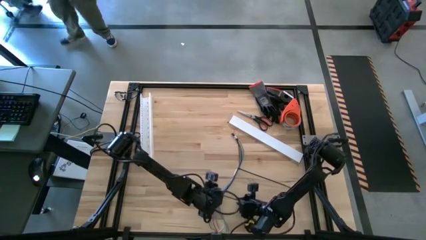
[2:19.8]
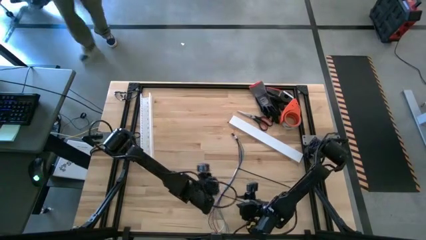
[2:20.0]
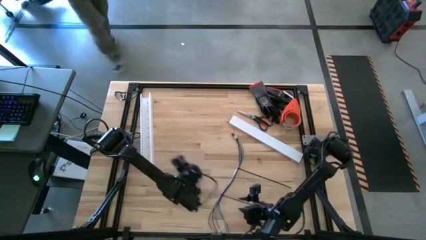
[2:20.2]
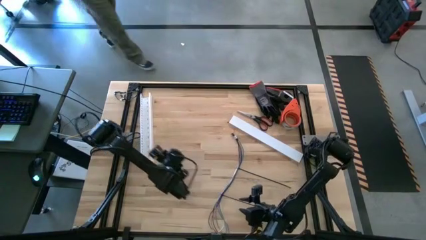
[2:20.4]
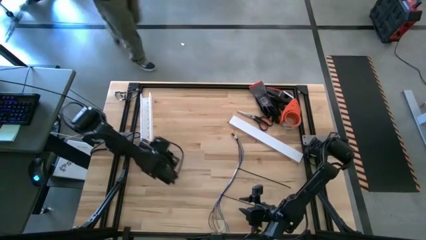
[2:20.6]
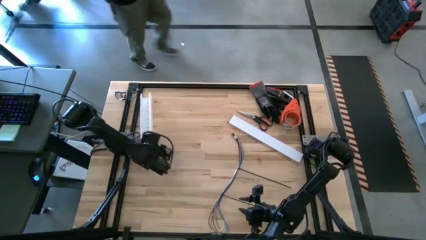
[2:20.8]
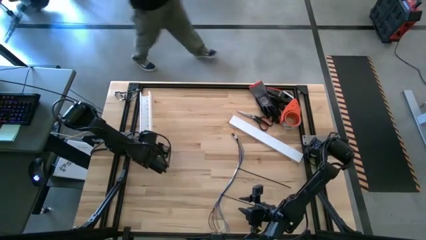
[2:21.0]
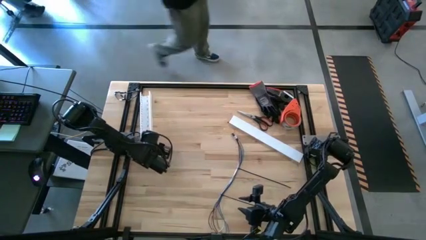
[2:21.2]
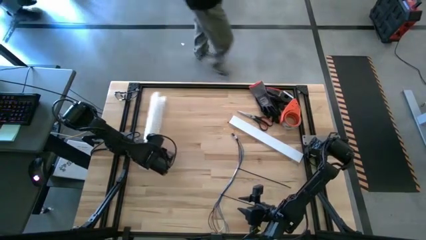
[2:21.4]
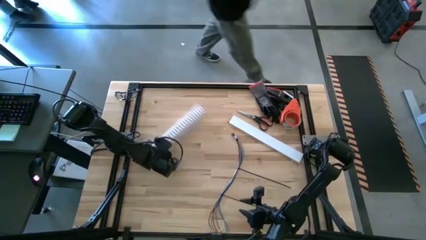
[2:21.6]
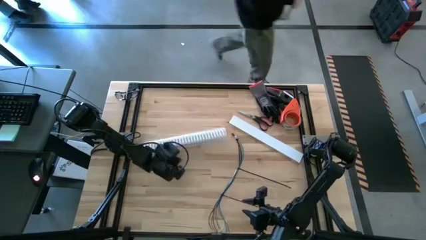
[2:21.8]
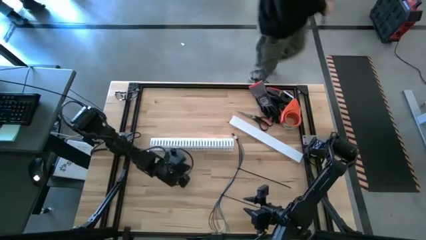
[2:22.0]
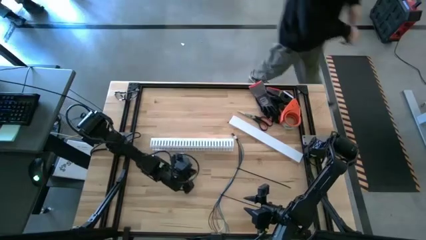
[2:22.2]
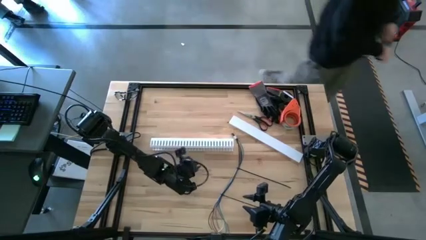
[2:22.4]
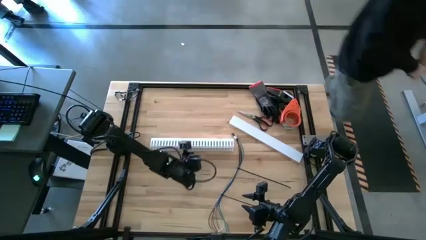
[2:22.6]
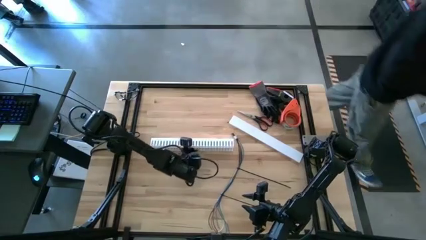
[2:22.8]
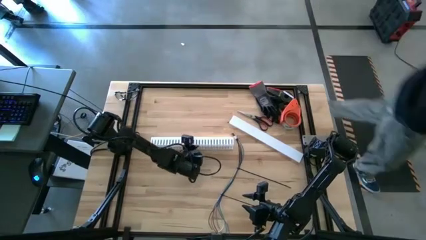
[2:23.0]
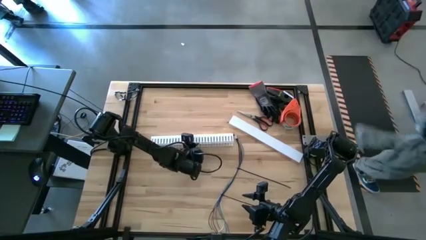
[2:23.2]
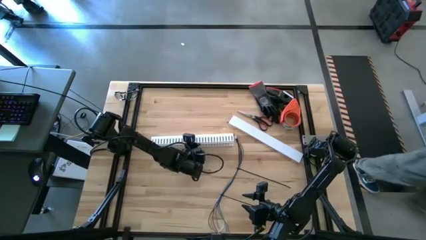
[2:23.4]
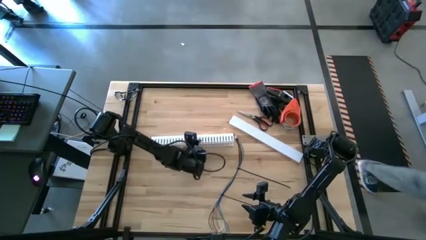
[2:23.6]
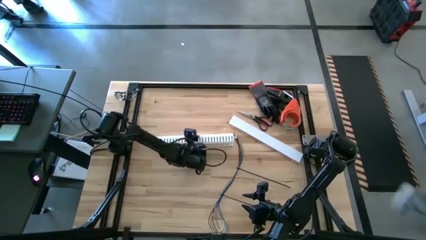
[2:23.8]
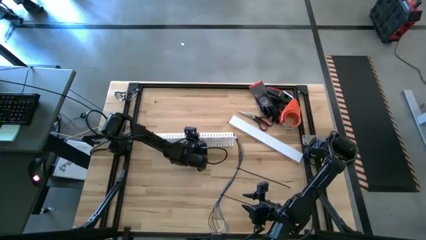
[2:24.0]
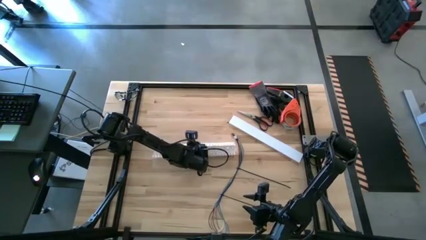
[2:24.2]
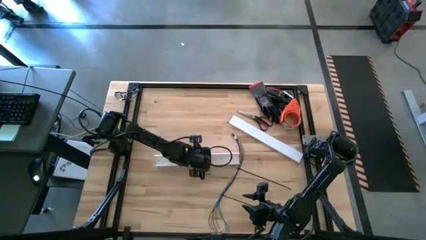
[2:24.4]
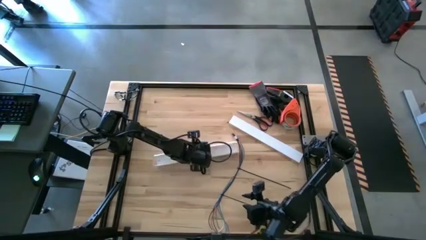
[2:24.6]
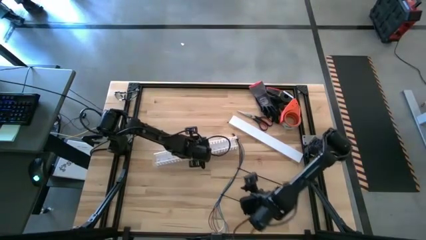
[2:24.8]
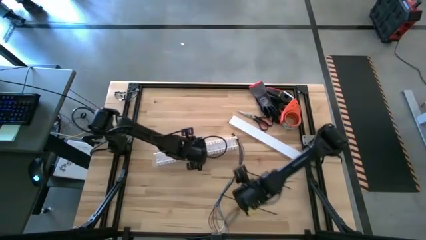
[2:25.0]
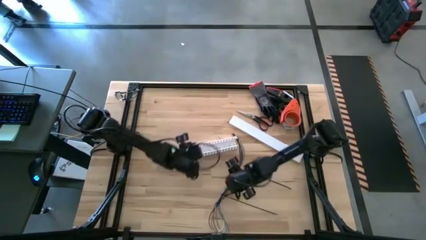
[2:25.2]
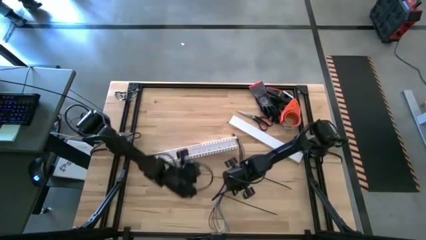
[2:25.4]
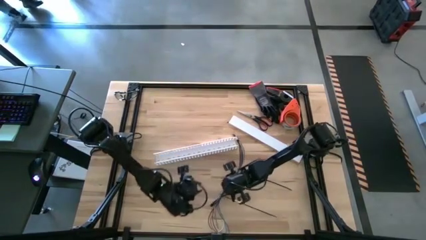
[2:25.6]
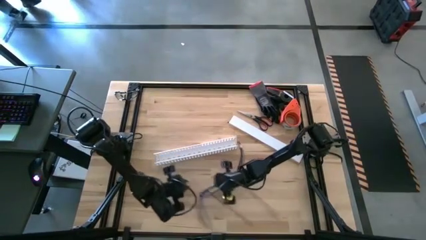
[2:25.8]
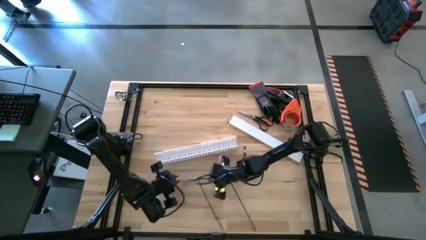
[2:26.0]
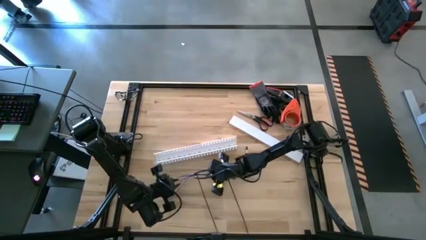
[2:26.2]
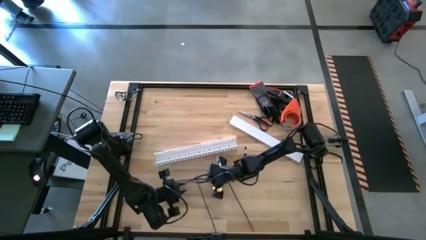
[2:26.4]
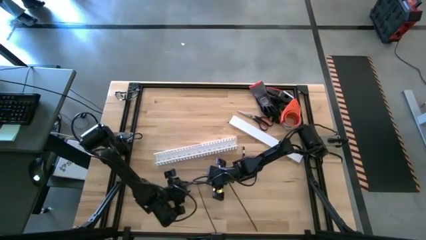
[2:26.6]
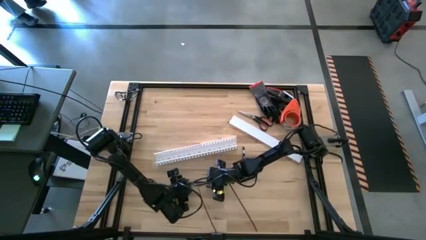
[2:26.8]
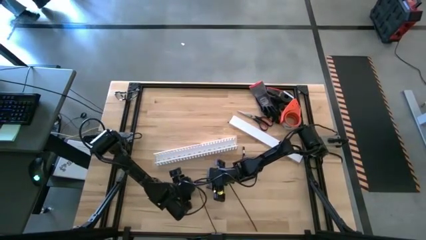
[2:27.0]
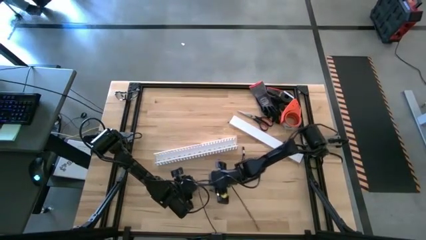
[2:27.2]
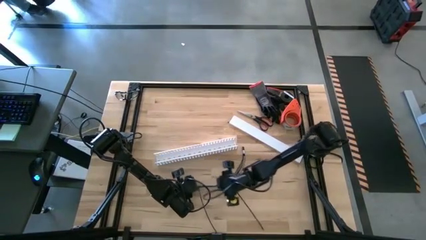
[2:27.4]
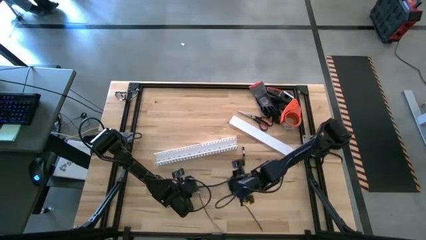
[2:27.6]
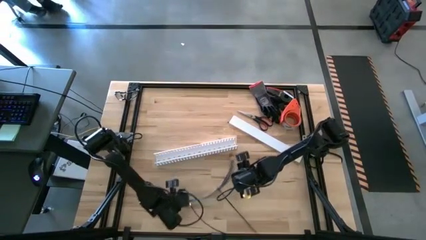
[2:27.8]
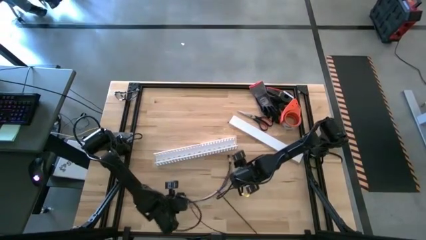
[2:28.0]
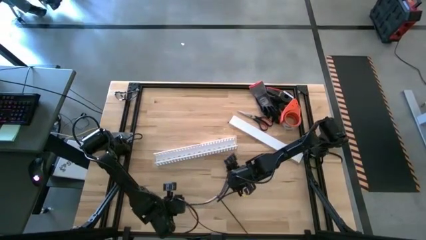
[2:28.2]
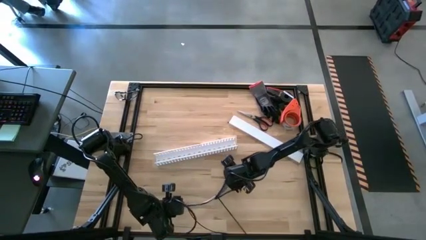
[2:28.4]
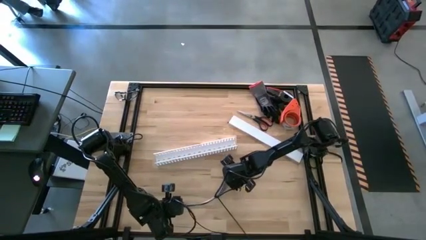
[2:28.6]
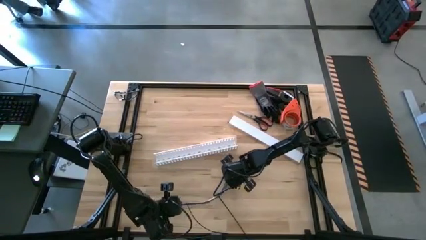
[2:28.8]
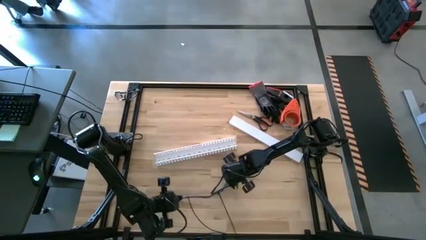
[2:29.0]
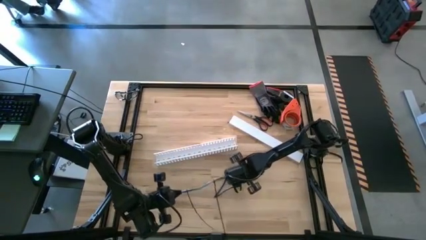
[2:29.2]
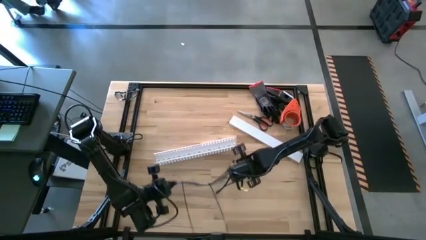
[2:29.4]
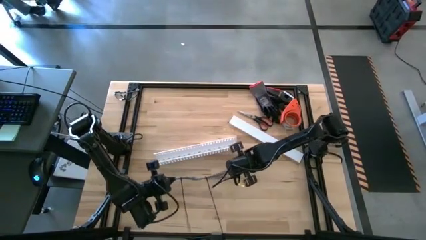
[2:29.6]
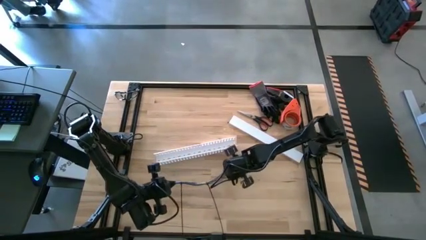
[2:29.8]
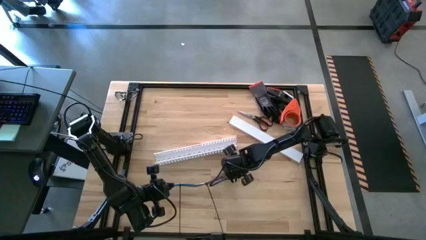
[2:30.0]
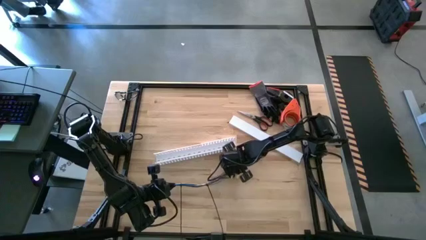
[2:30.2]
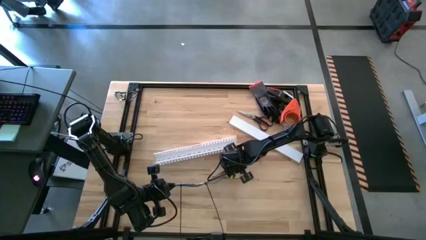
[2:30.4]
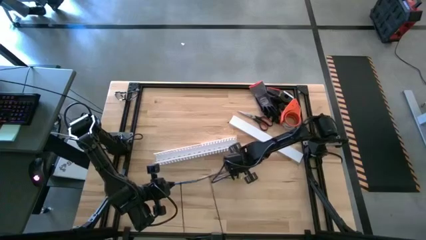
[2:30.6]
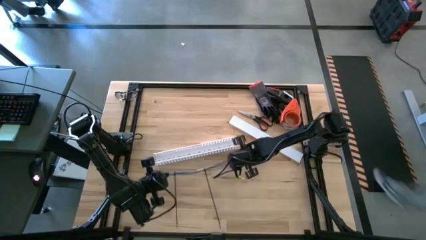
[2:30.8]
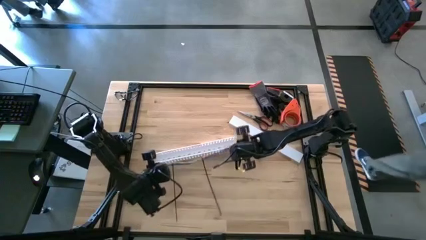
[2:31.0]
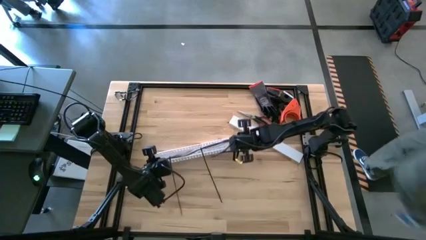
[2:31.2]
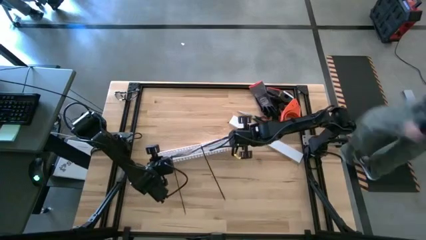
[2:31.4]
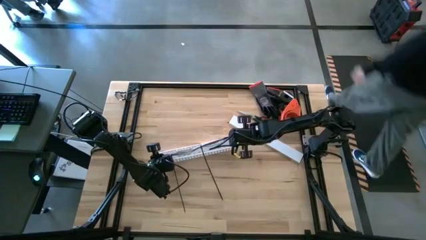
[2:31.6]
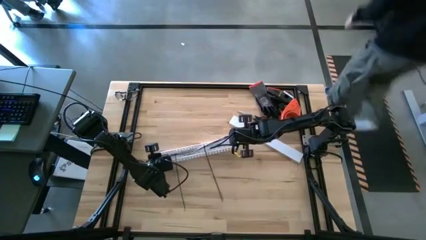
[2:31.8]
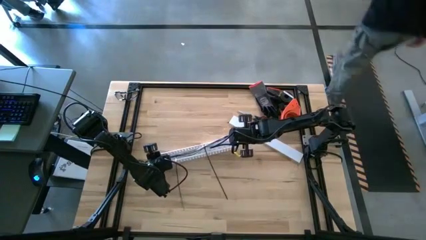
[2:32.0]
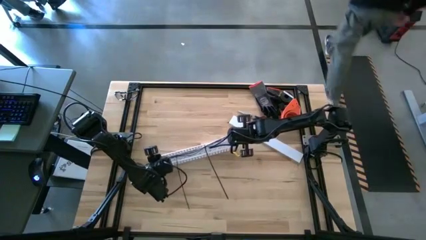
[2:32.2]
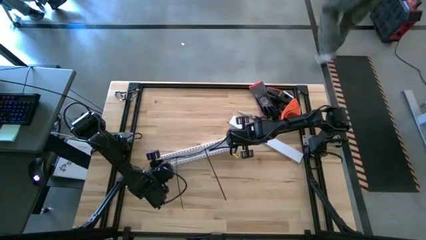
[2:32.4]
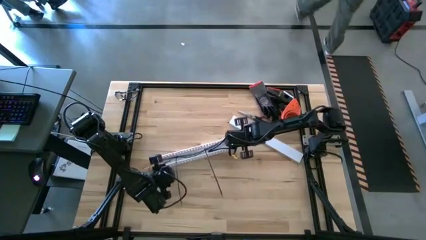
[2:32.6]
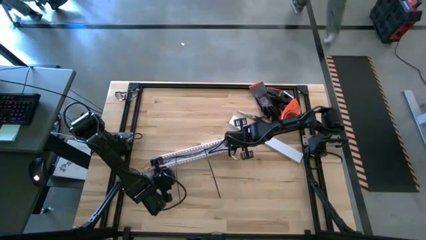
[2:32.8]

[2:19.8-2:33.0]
Task: Ziptie cables
Put the cable into the cable duct

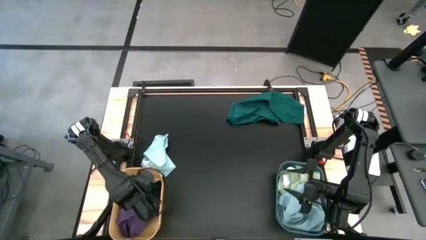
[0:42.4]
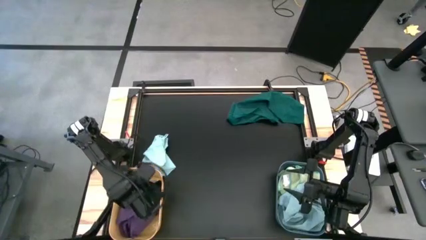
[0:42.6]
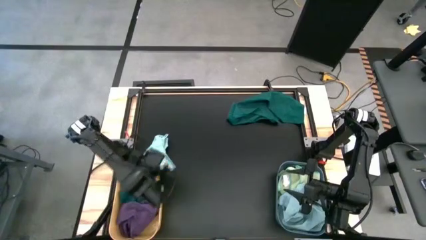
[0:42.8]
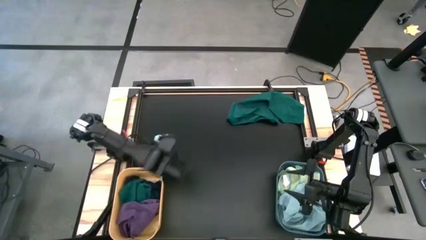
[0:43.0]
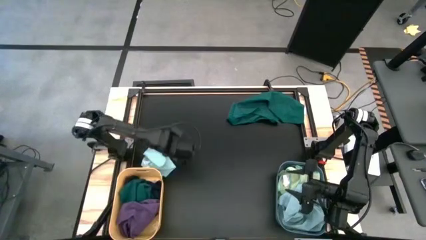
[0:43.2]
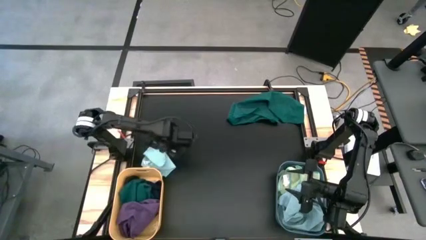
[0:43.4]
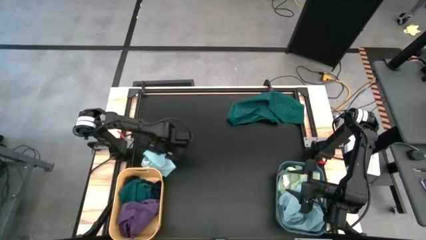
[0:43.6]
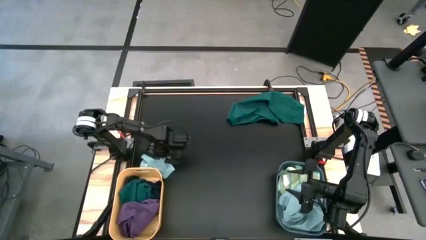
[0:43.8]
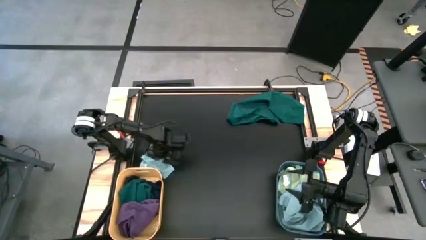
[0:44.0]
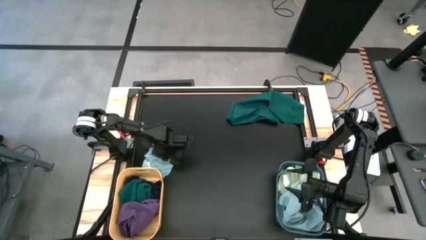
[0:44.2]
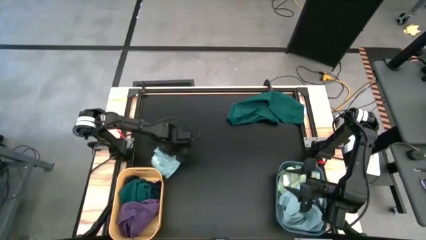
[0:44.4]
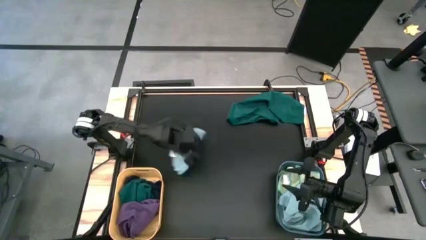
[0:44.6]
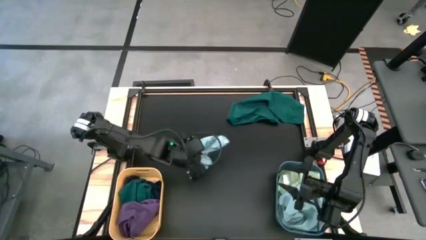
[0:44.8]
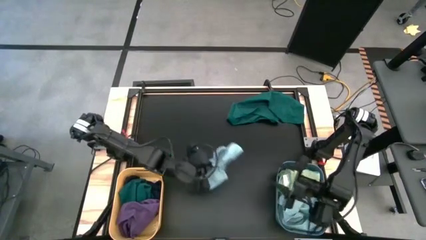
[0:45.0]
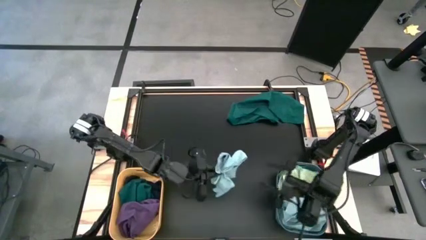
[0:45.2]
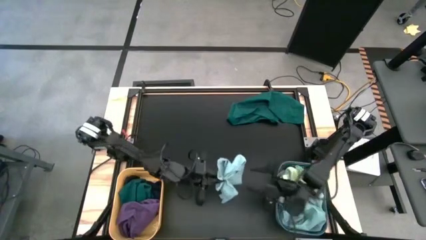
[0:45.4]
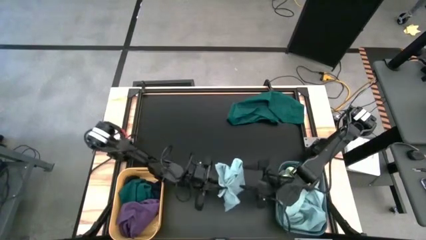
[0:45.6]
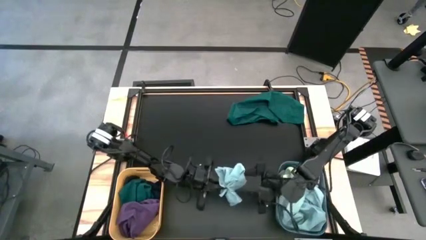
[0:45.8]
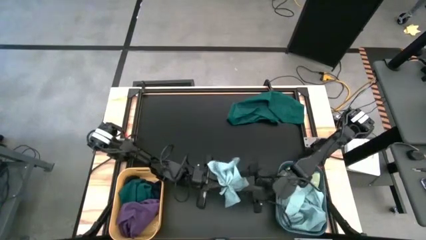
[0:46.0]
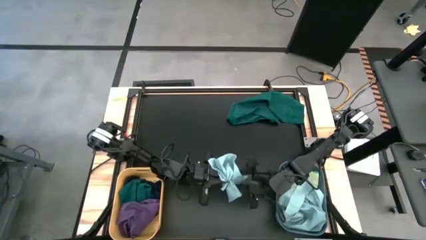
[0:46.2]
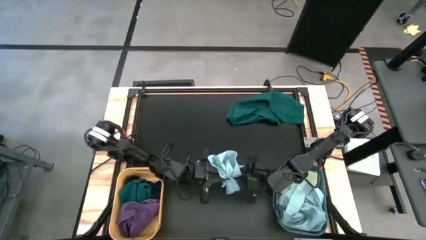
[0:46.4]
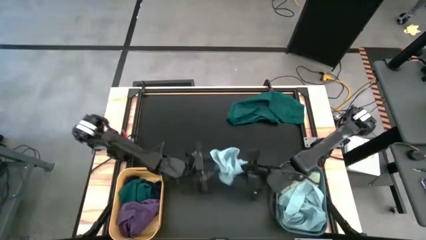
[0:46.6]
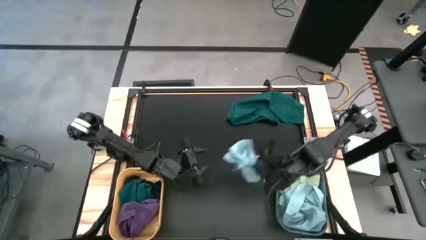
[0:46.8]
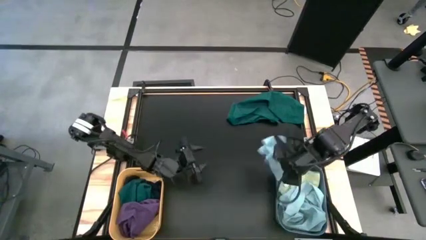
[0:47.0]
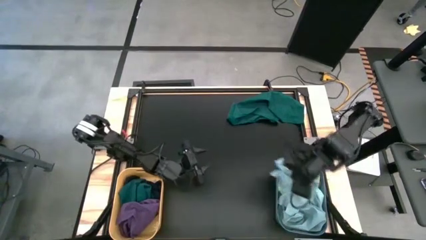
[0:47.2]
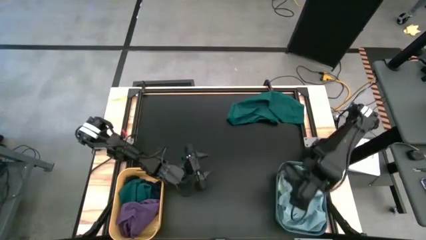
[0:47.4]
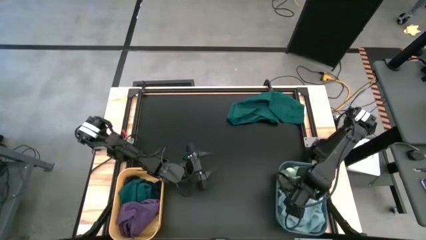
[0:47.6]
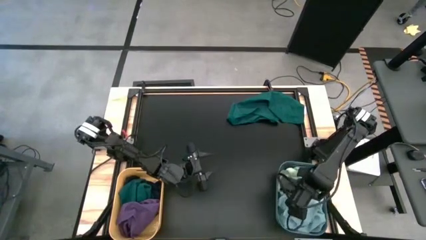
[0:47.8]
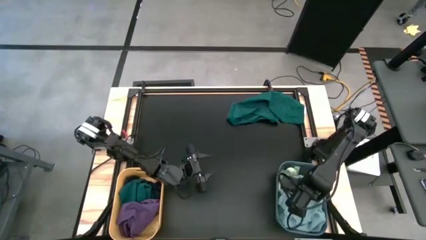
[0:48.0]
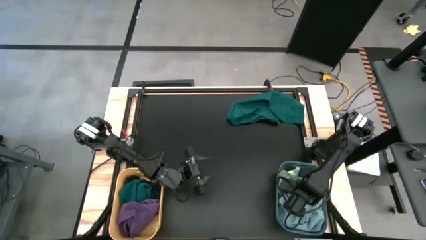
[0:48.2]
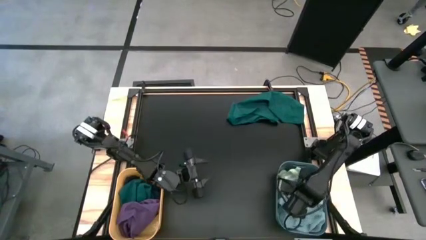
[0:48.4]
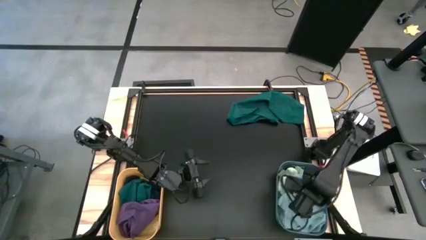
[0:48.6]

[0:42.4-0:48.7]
Task: Sort microfiber towel by color & place in baskets
Put the light blue microfiber towel into the blue bin
